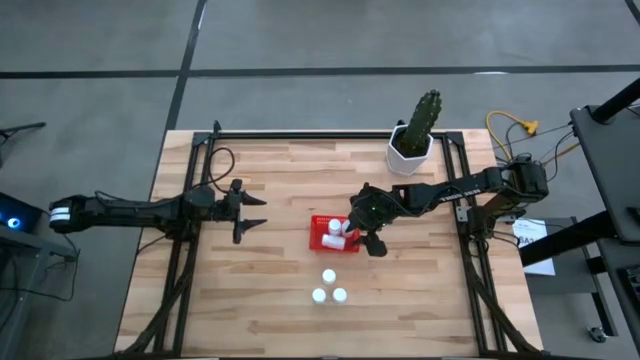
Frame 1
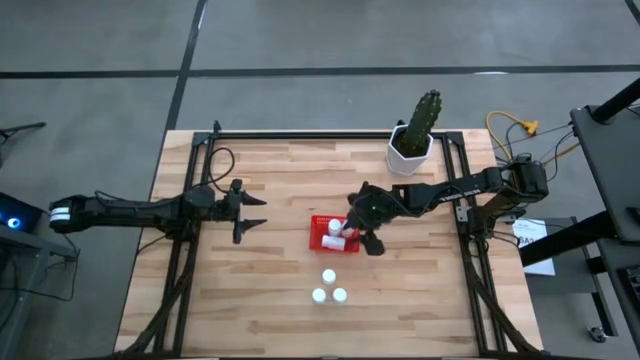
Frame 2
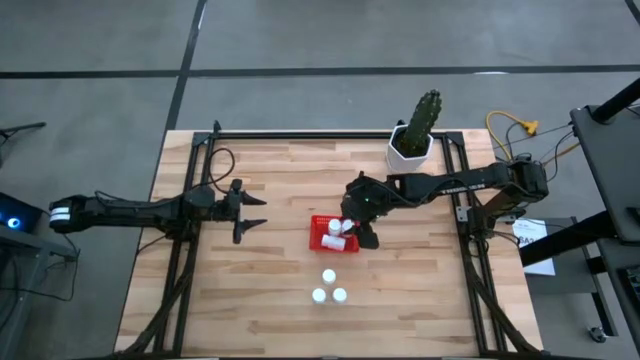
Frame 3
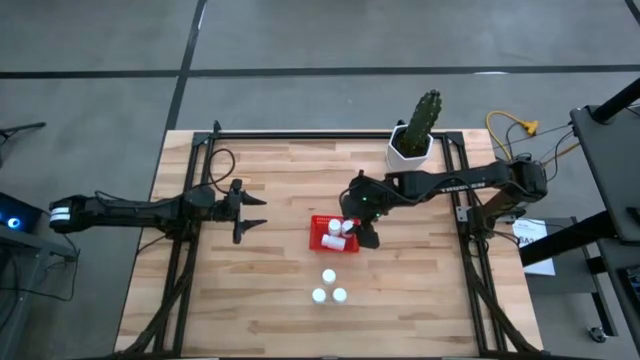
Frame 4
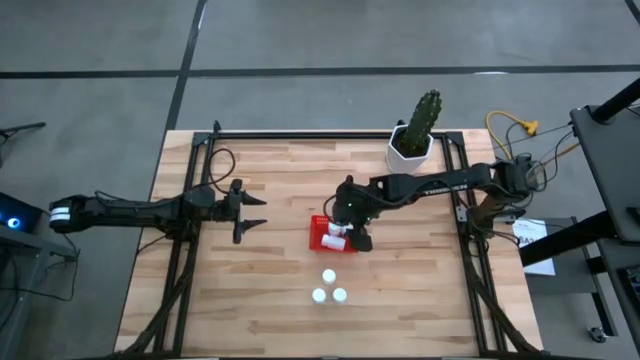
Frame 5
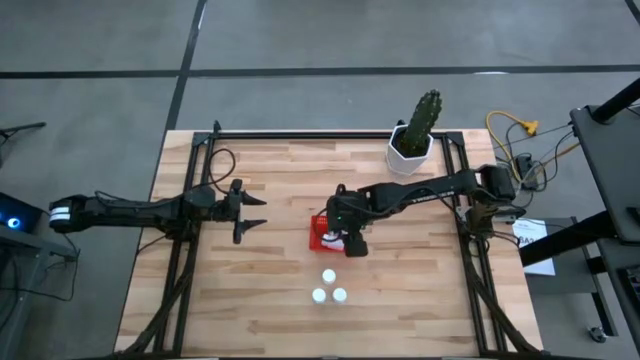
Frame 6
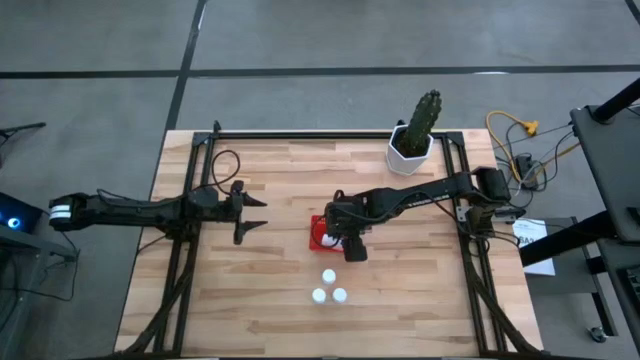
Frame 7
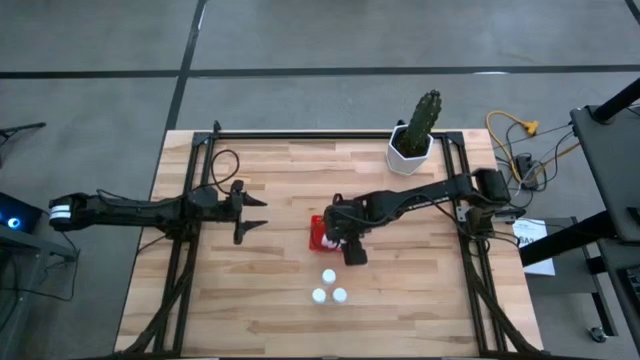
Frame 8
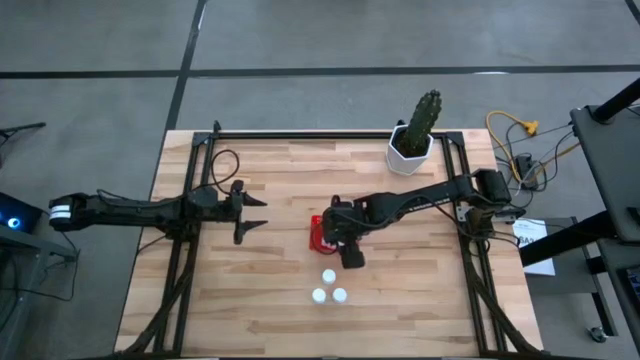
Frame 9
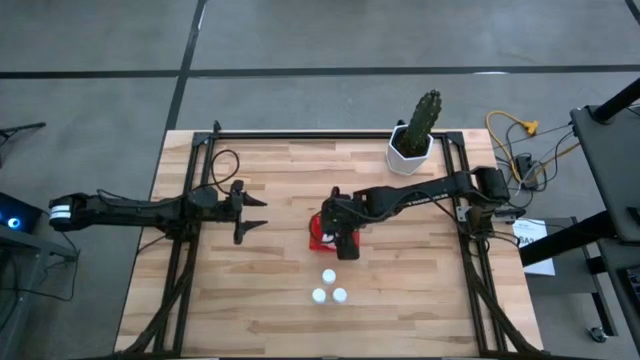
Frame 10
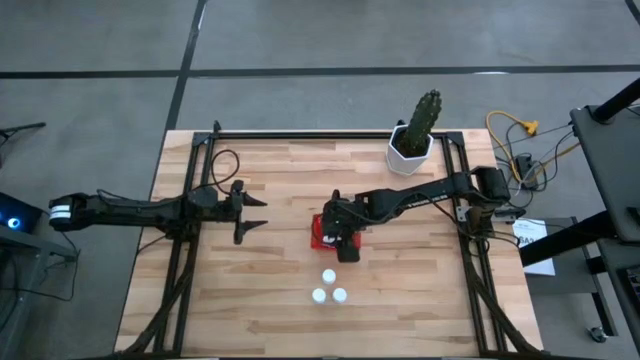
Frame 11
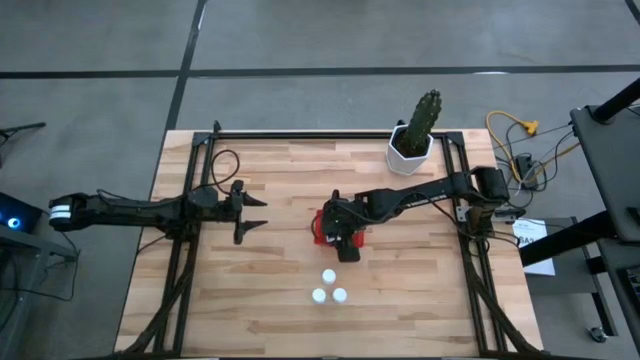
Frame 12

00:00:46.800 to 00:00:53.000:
Task: Pick and place pill bottles into a basket
Adjust the white pill bottle in the red basket

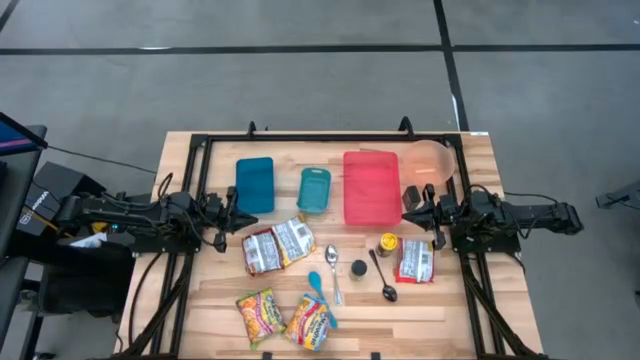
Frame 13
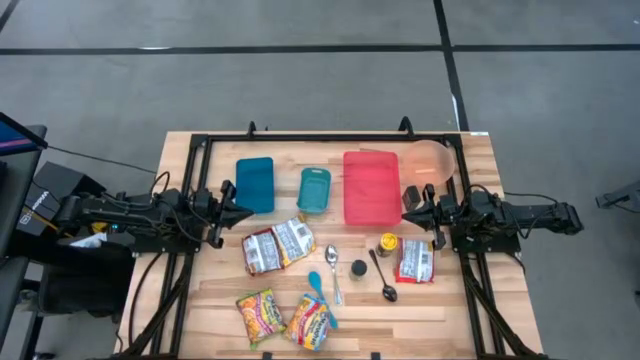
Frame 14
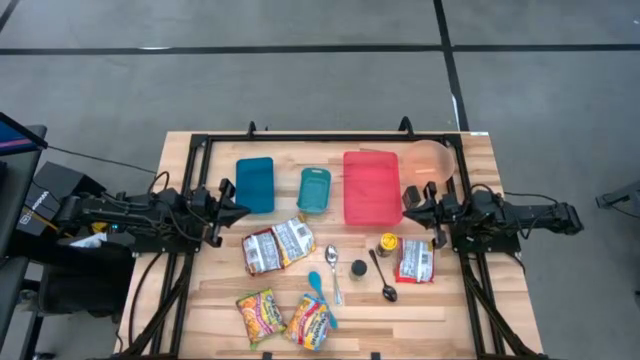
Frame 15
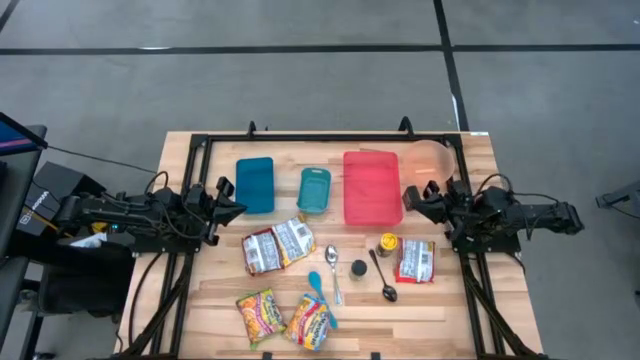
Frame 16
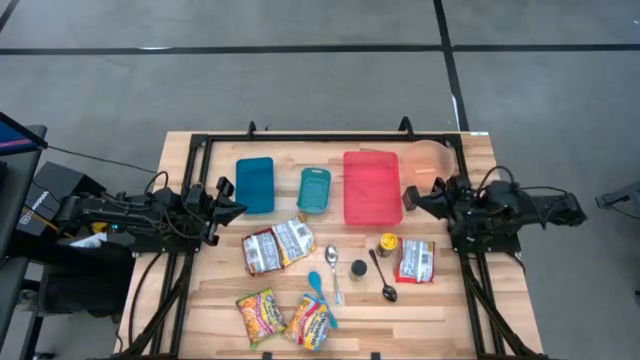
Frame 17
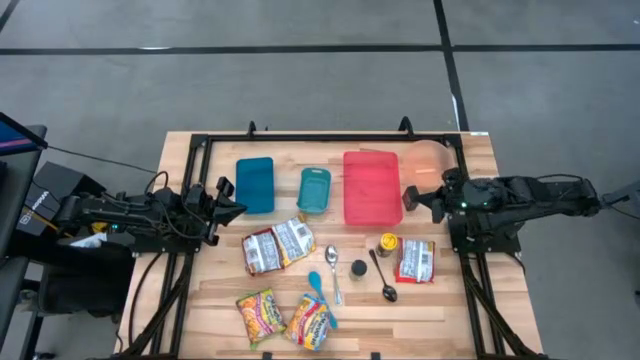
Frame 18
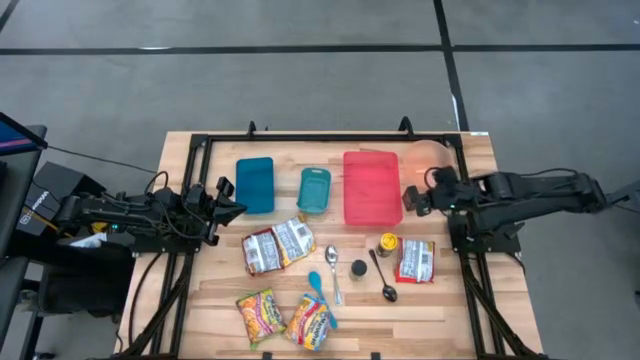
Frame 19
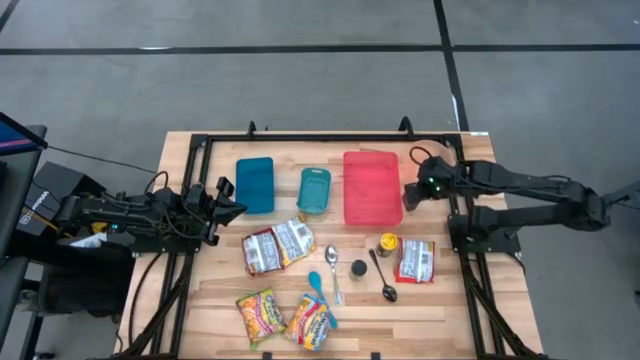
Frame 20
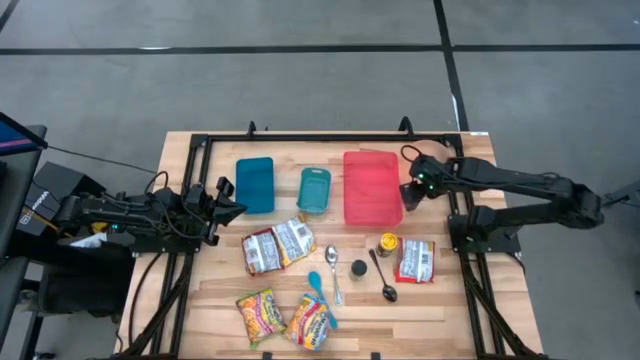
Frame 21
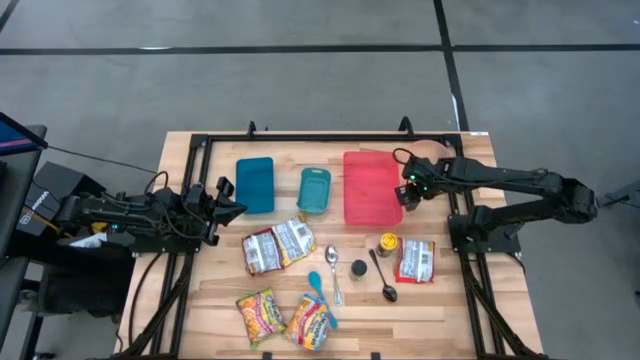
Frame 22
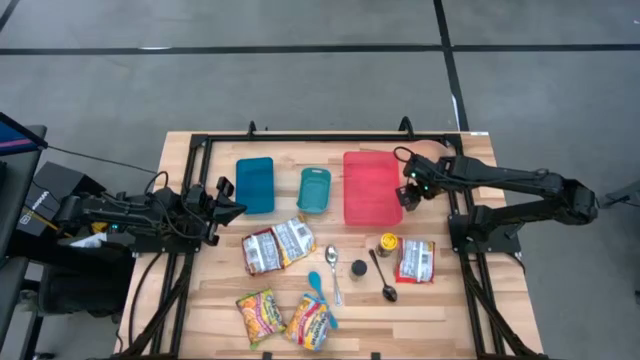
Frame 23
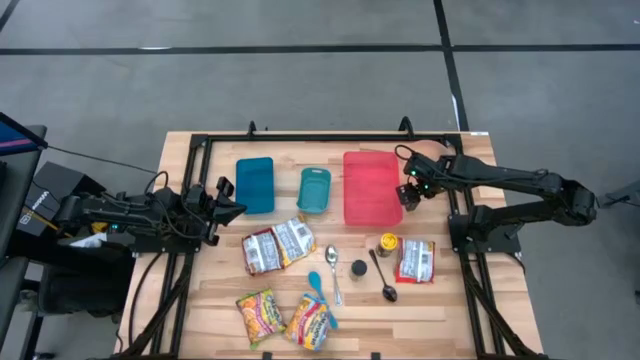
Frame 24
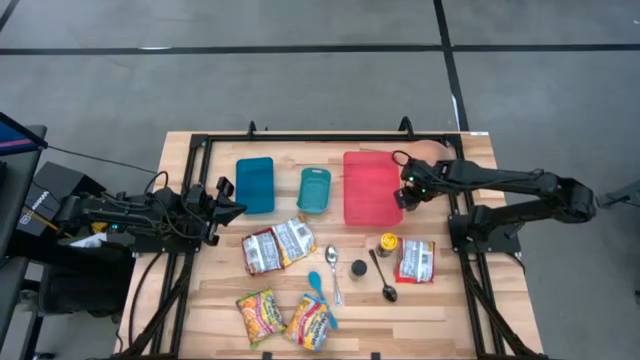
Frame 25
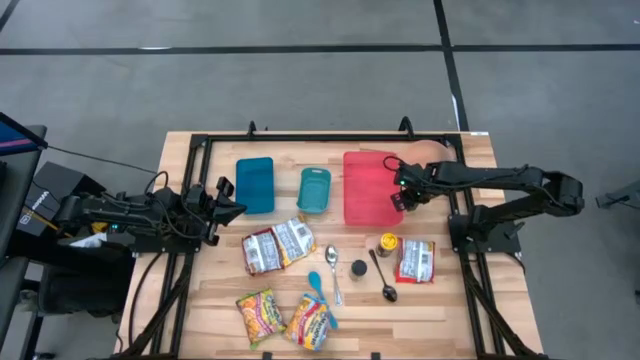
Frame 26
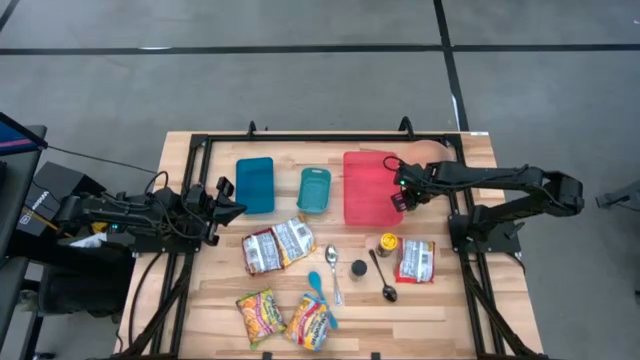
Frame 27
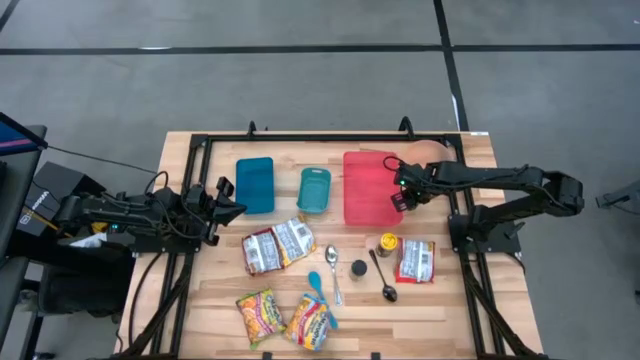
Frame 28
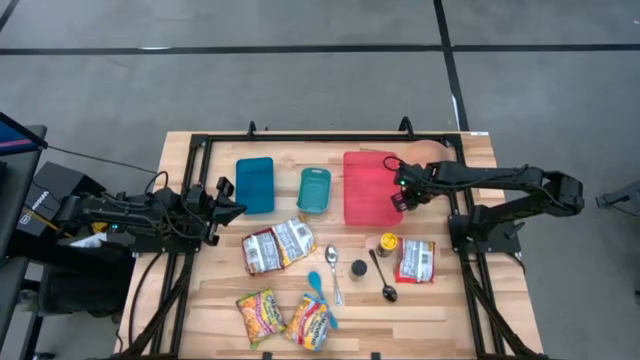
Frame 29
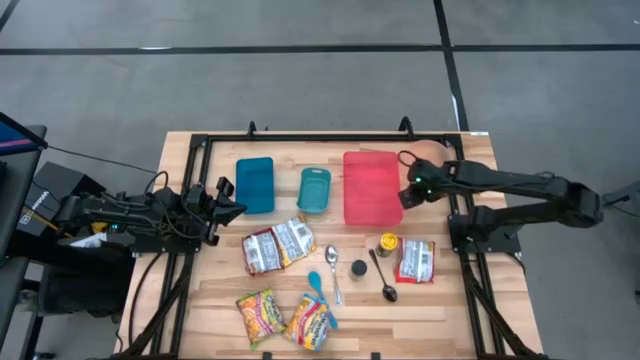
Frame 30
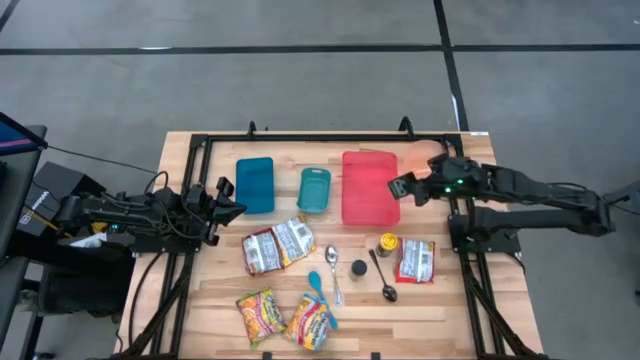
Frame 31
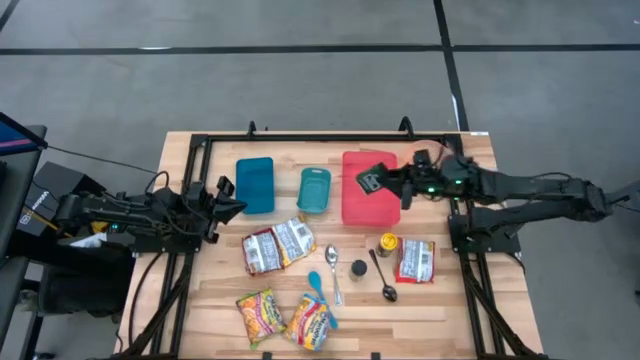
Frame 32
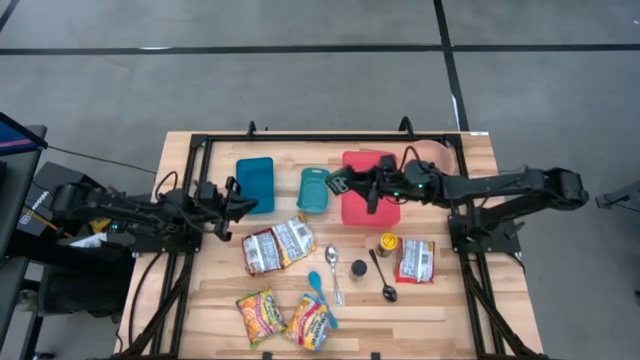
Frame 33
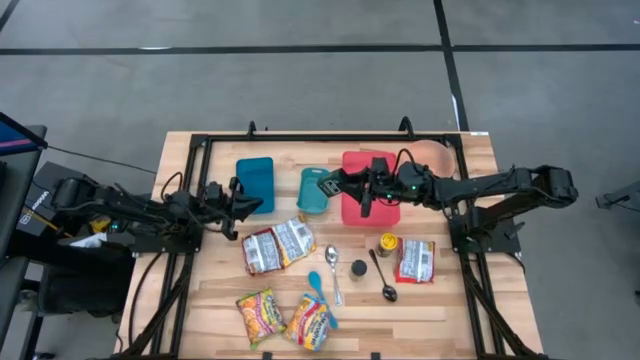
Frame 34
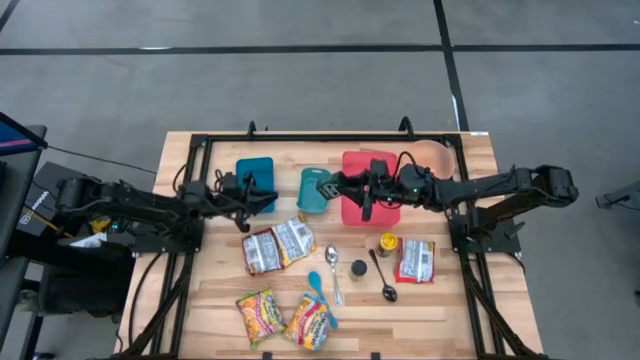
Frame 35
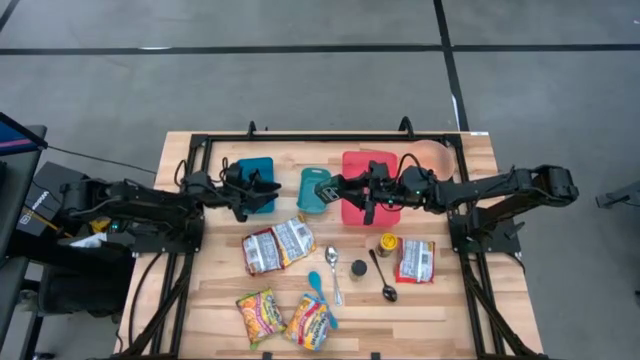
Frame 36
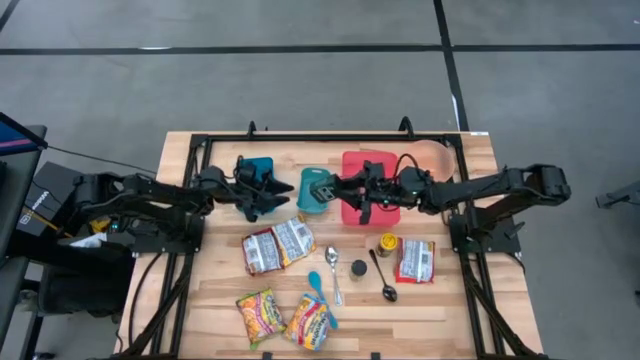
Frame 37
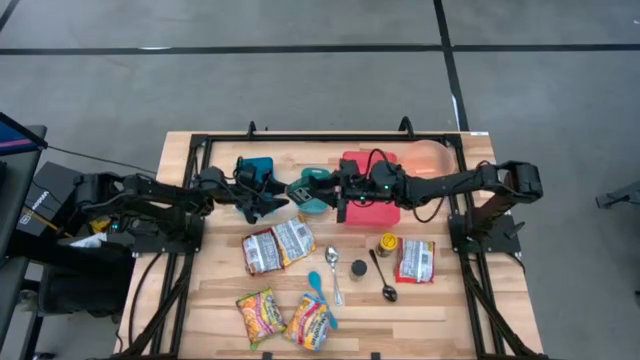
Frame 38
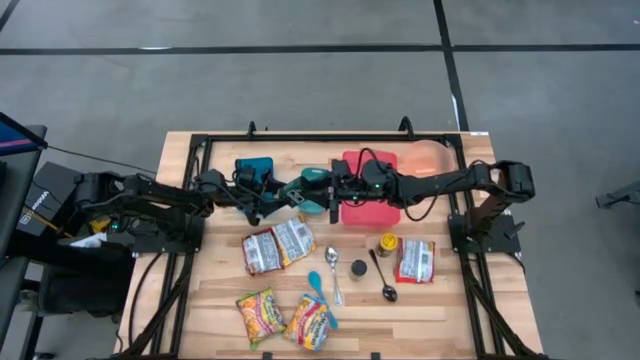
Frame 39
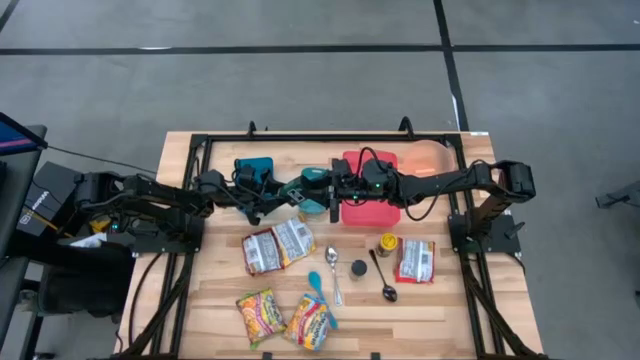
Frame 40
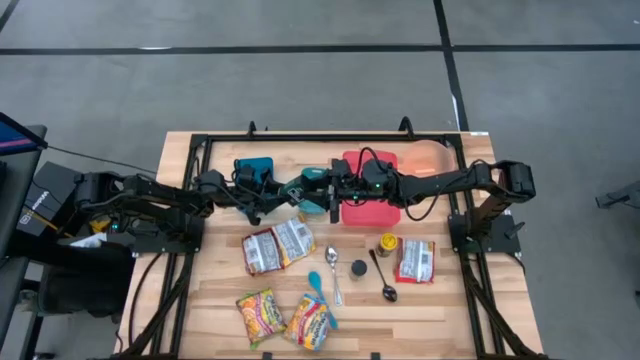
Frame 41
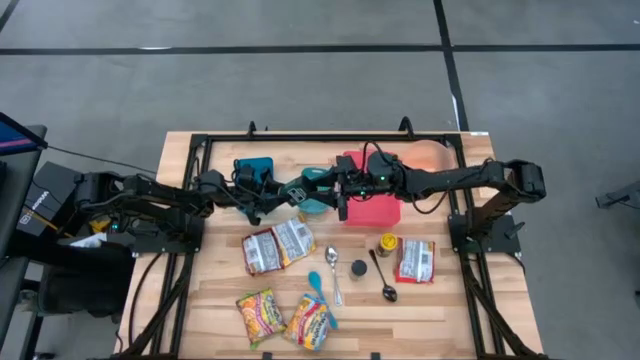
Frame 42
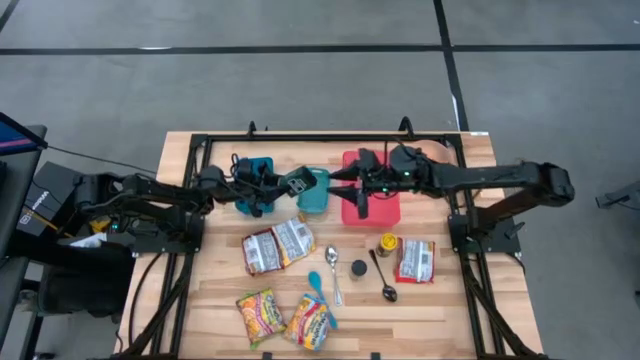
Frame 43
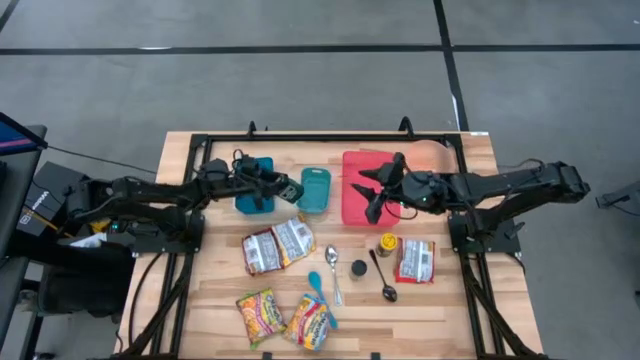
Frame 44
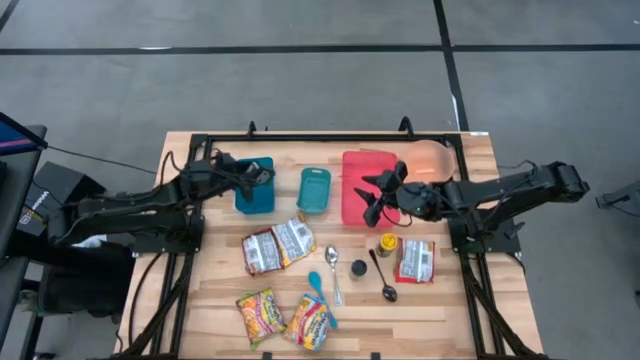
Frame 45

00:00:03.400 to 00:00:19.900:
Task: Pick & Place Food Item
Put the black spice can into the blue bin
